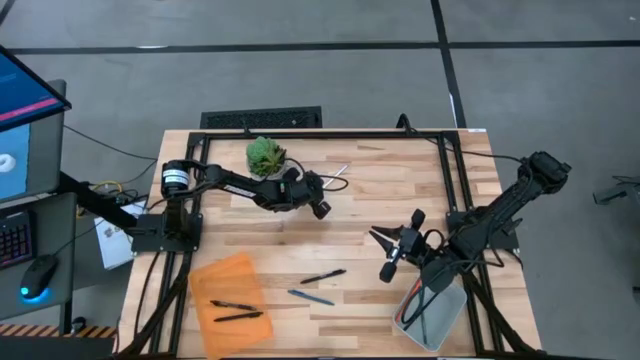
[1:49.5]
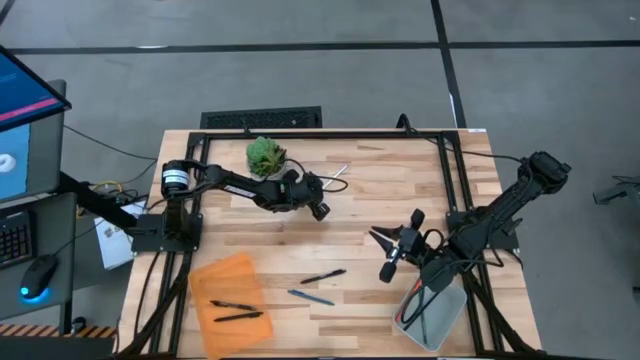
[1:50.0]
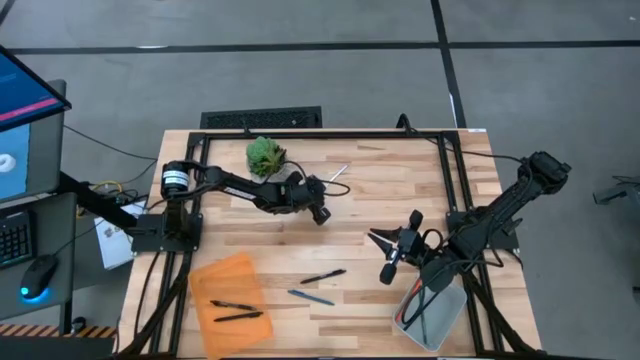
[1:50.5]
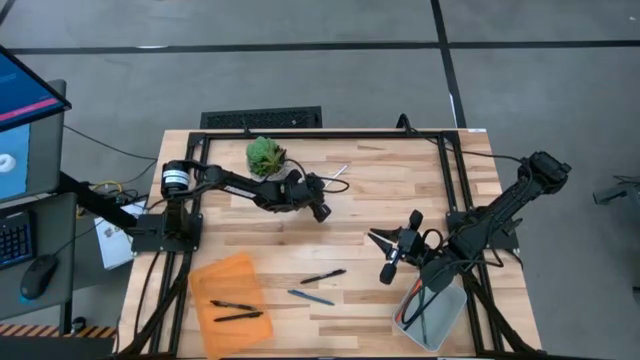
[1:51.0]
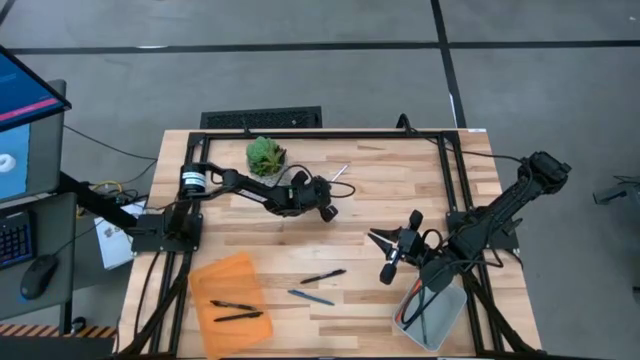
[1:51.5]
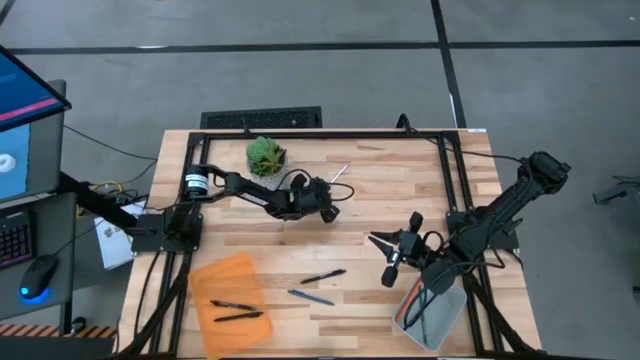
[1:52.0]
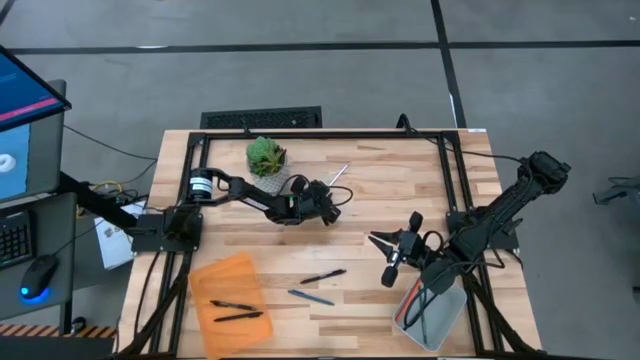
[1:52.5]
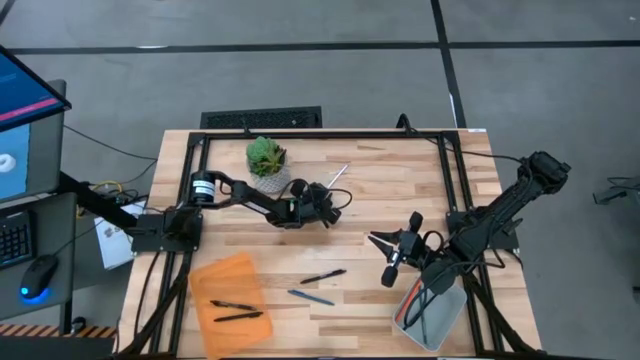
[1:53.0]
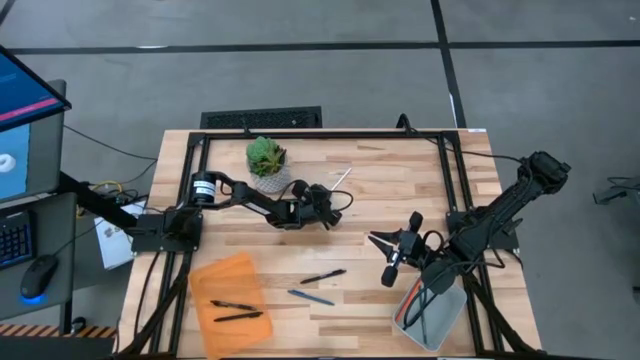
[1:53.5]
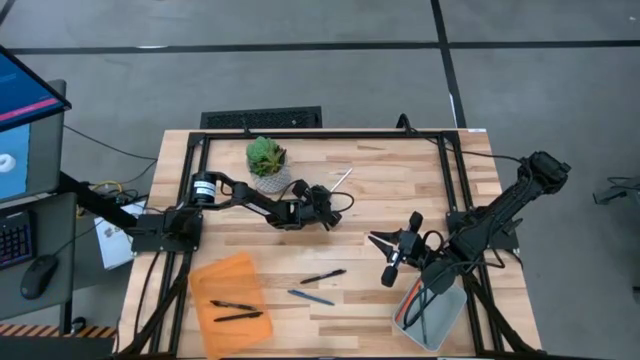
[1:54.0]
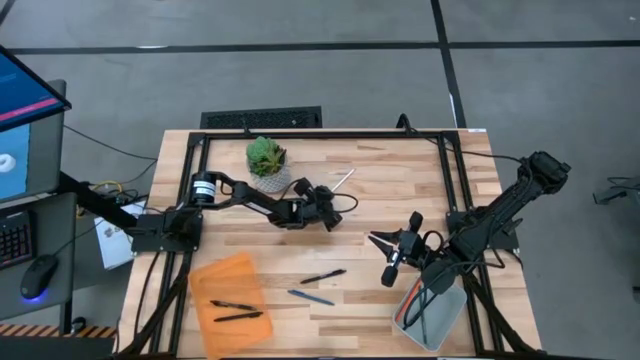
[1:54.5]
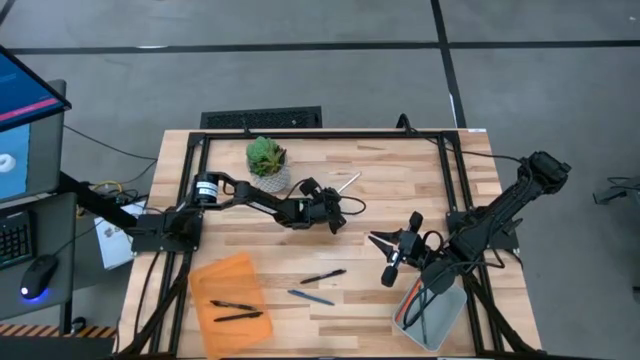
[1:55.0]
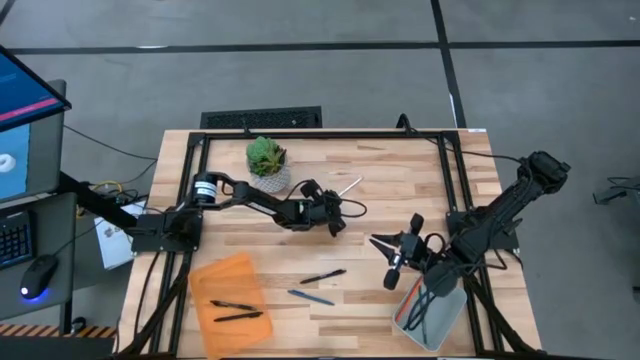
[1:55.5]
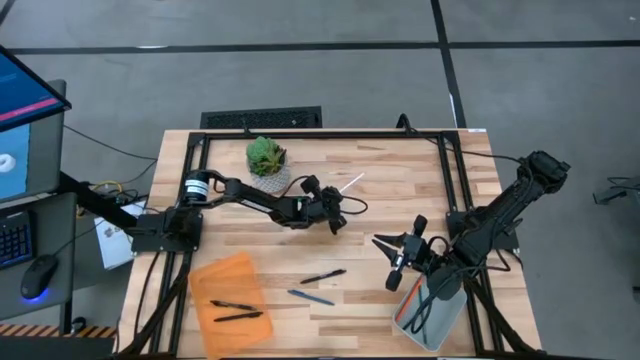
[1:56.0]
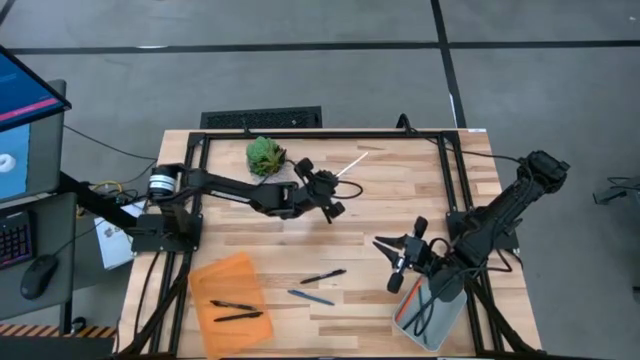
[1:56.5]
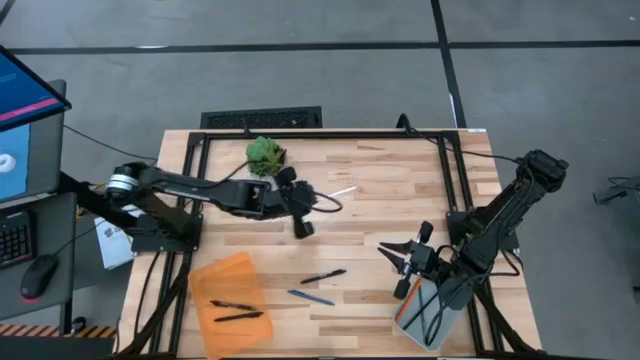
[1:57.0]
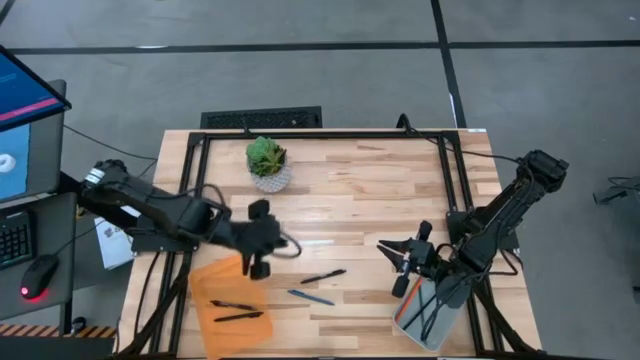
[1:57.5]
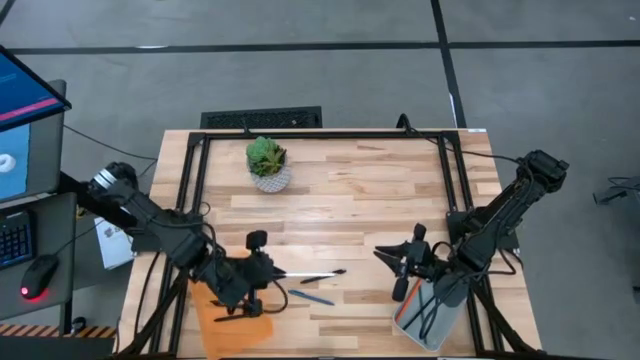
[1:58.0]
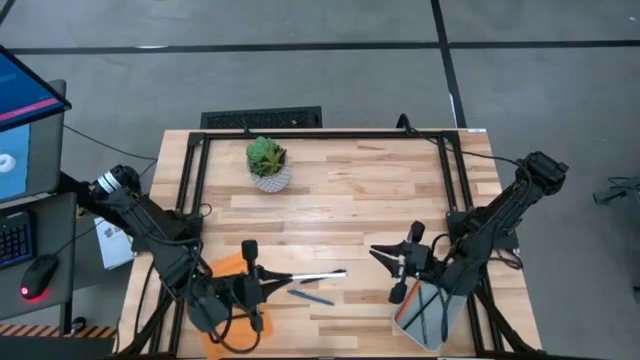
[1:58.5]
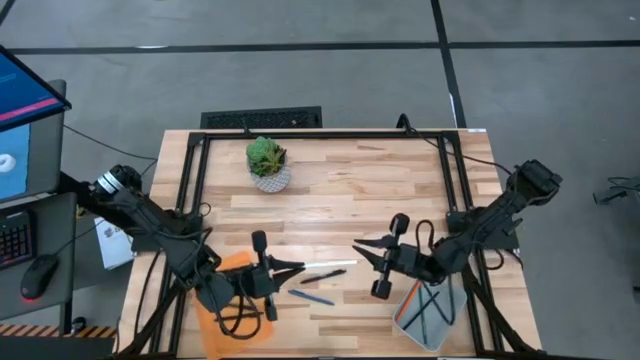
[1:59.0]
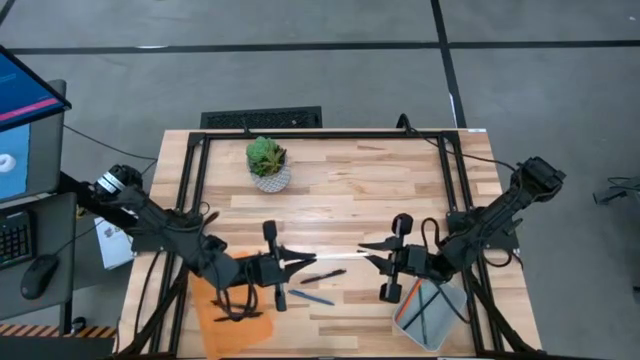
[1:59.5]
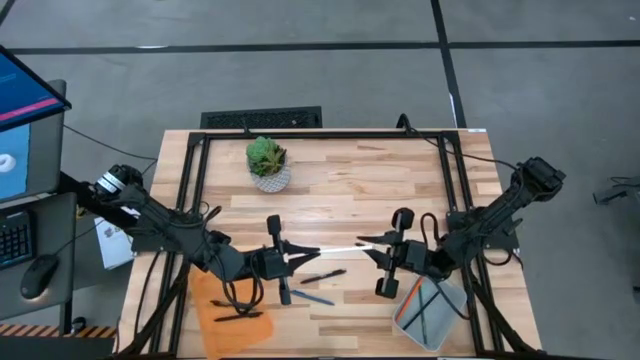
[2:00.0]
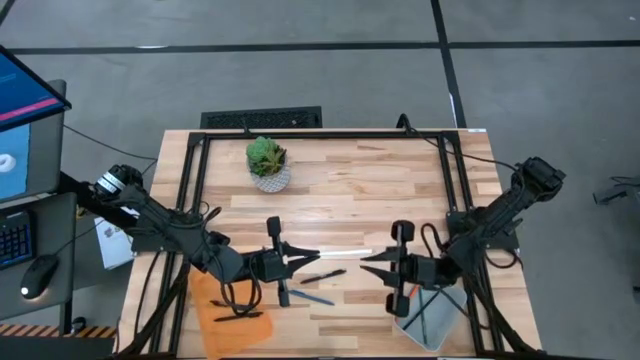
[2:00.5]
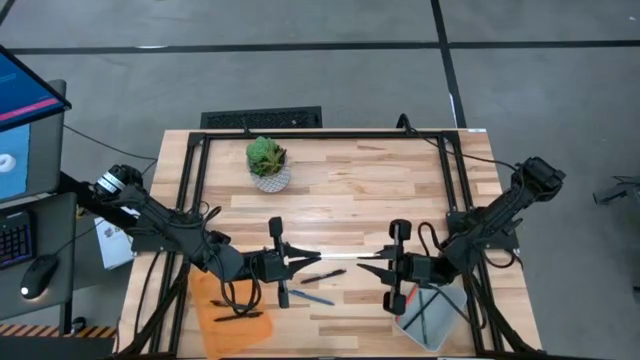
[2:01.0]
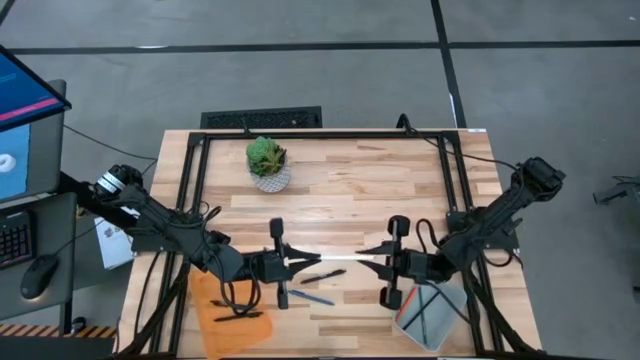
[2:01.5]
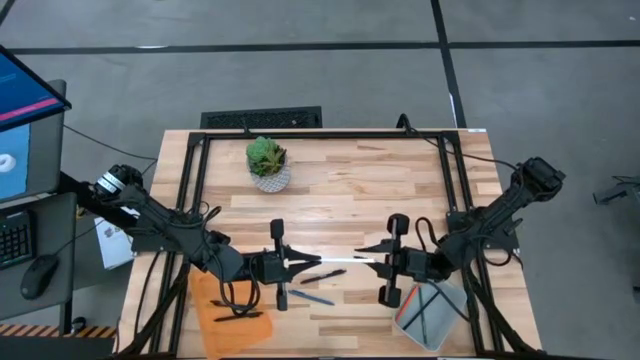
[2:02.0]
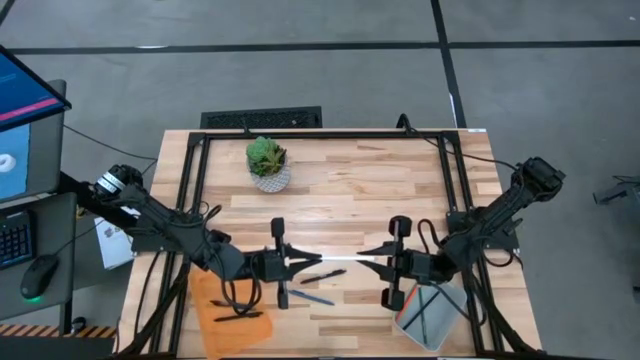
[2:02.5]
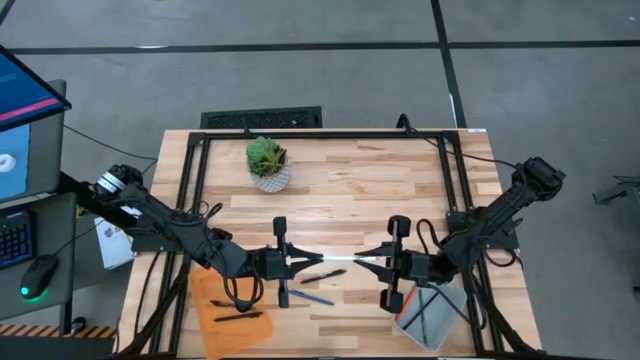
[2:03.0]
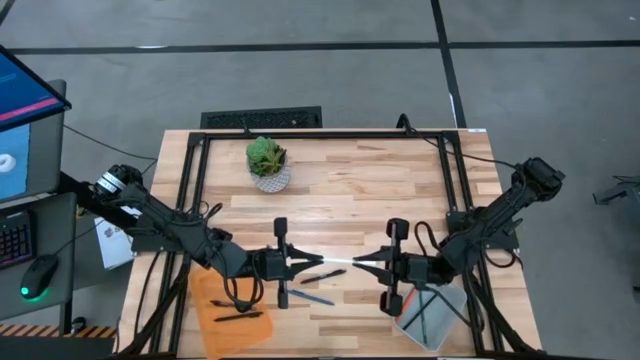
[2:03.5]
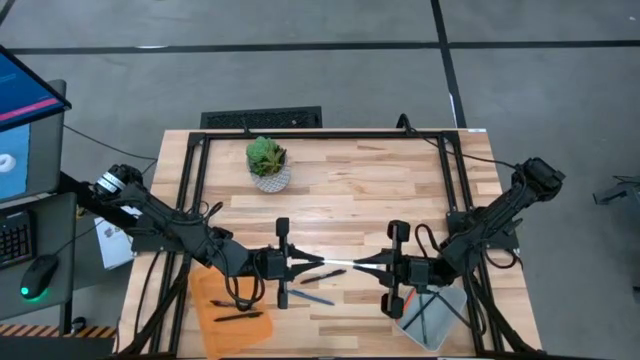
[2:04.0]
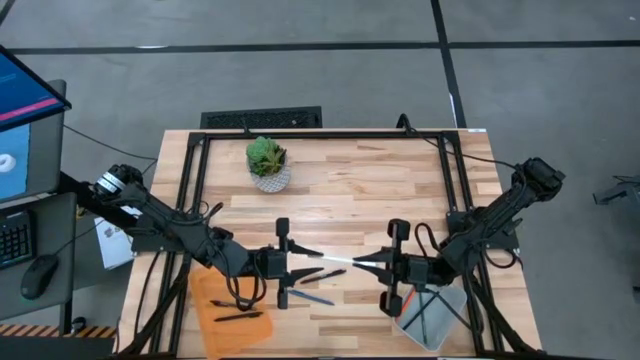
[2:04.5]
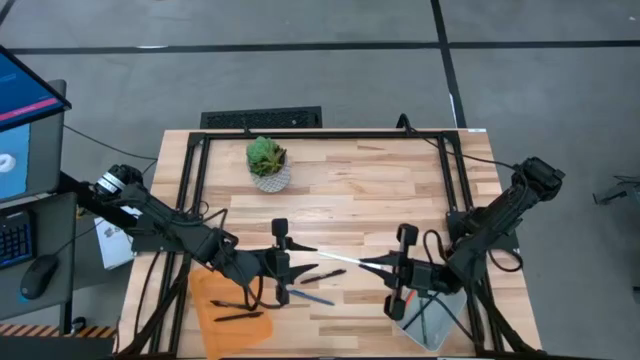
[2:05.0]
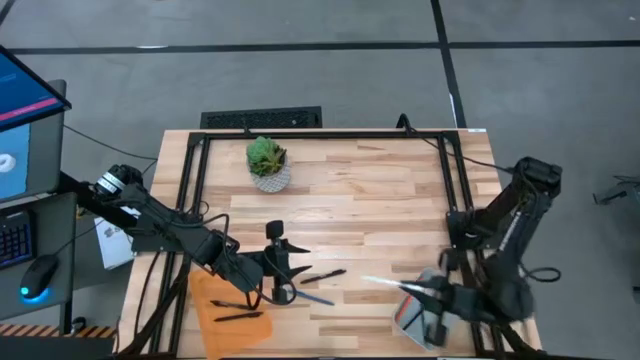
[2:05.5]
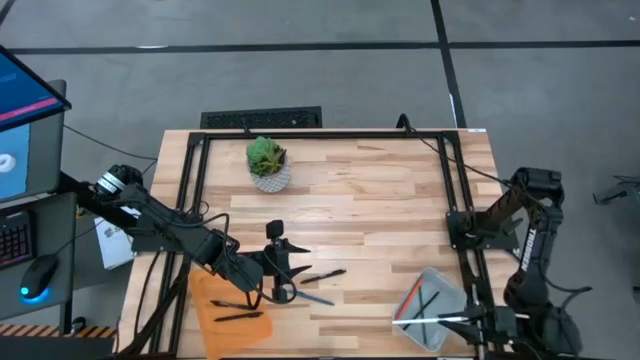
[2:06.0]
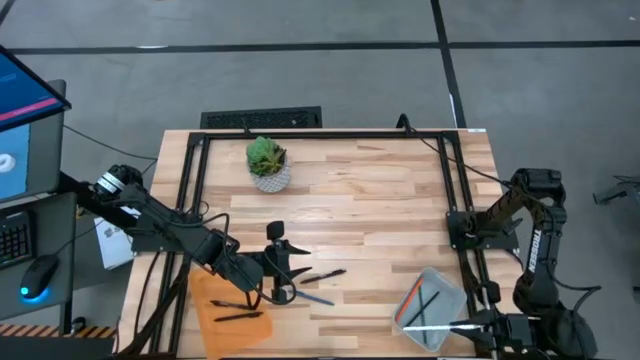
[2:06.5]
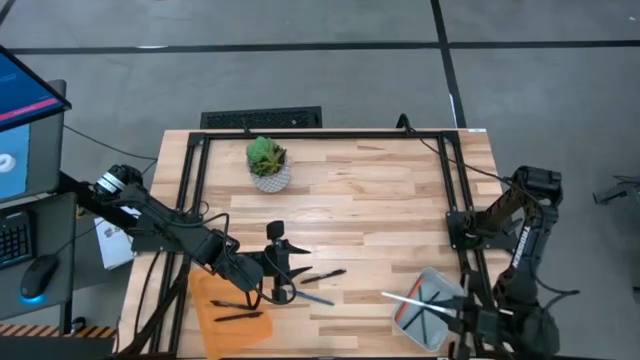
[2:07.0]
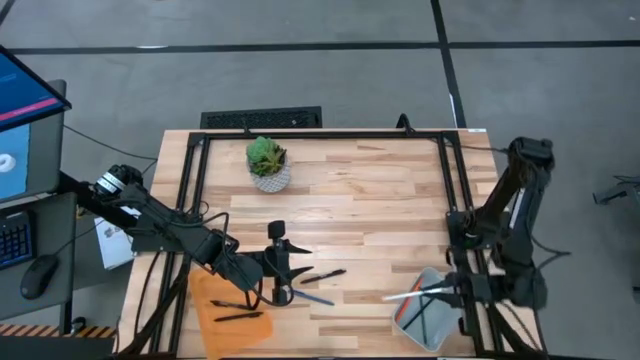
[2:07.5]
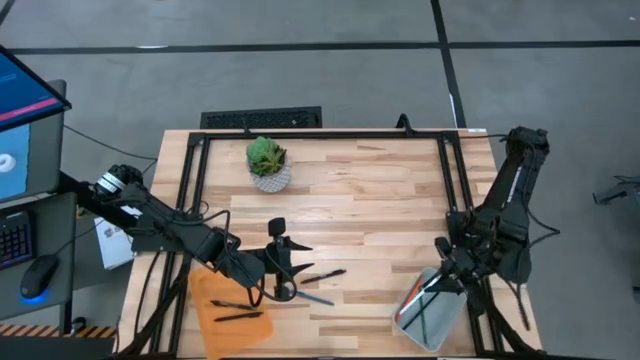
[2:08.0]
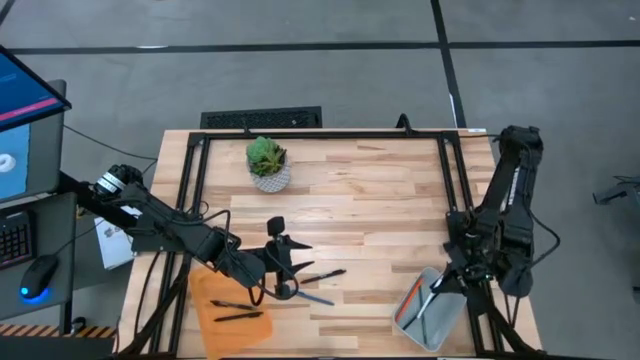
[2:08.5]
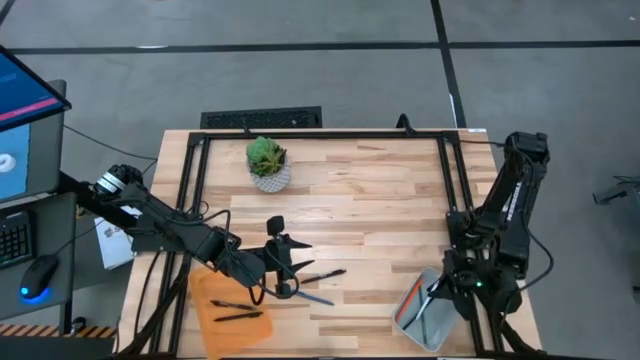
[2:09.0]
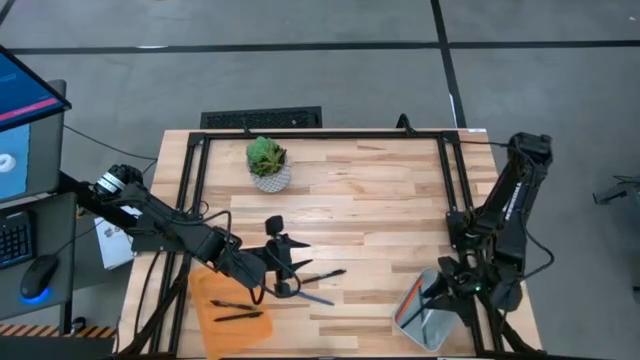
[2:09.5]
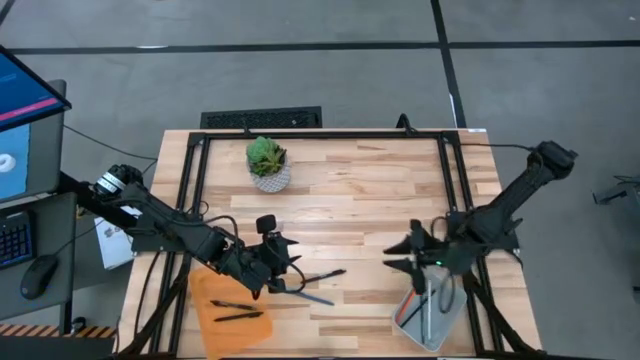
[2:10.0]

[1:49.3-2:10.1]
Task: Sort pens & pencils
Put the white pencil into the gray bin
